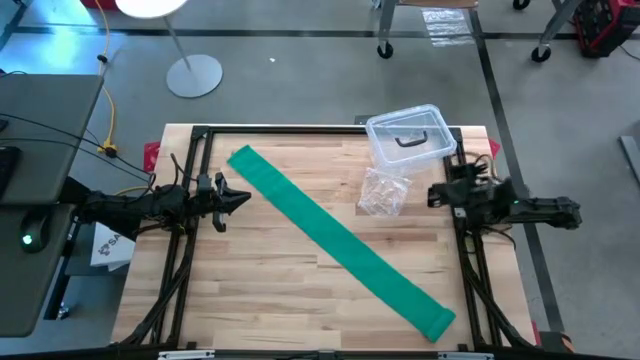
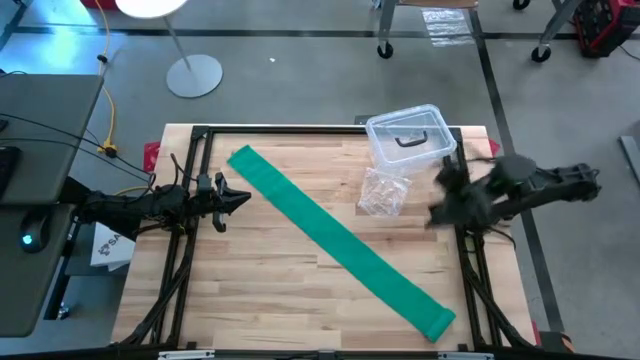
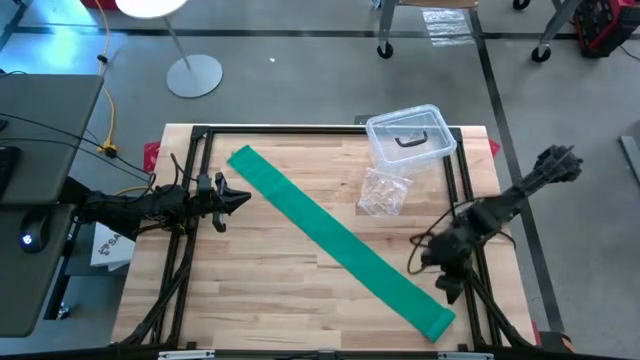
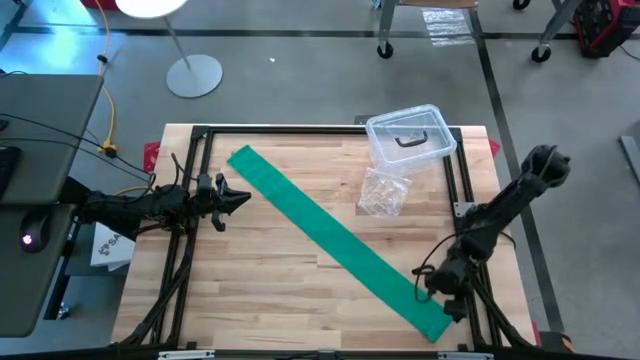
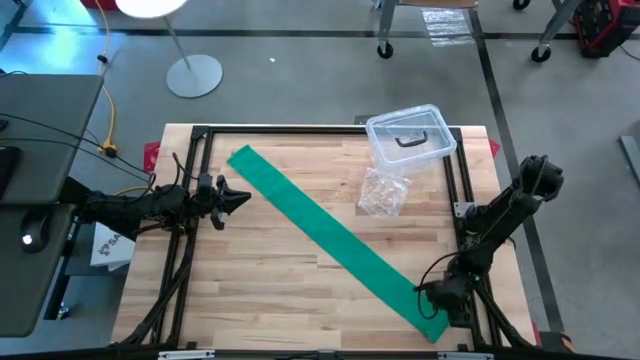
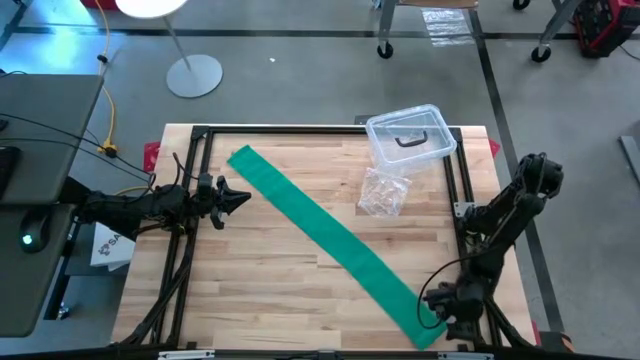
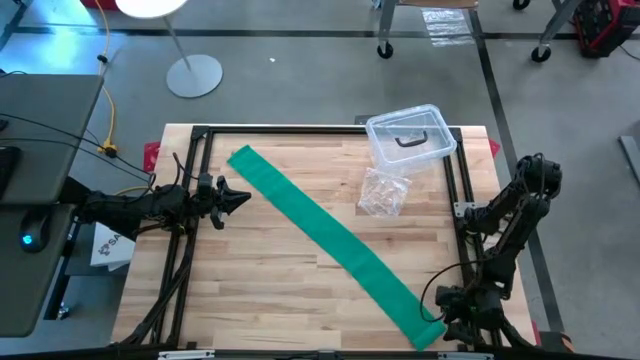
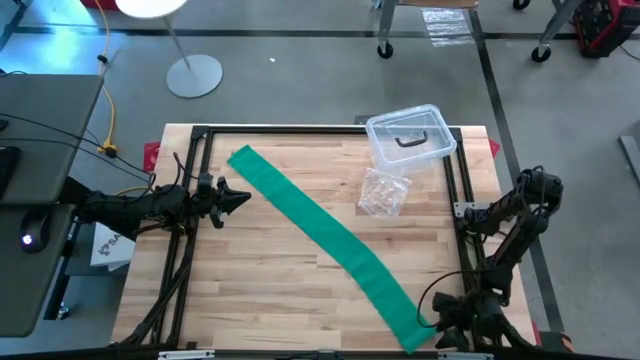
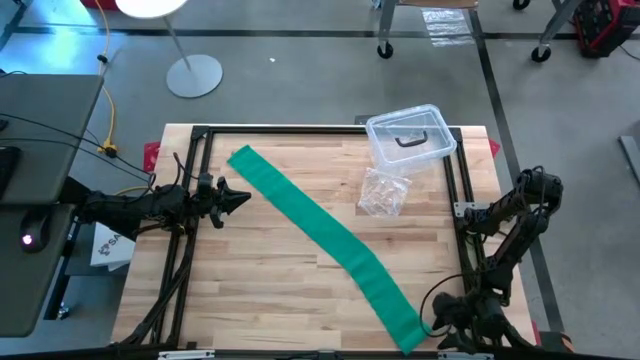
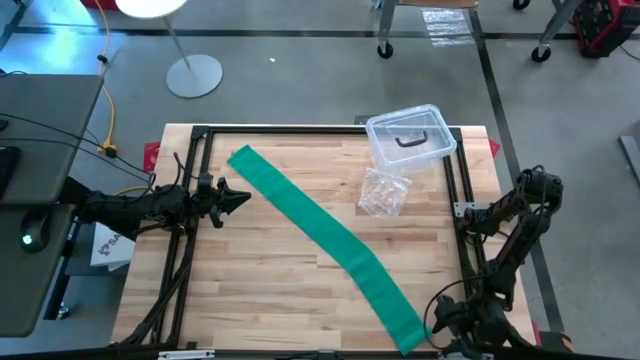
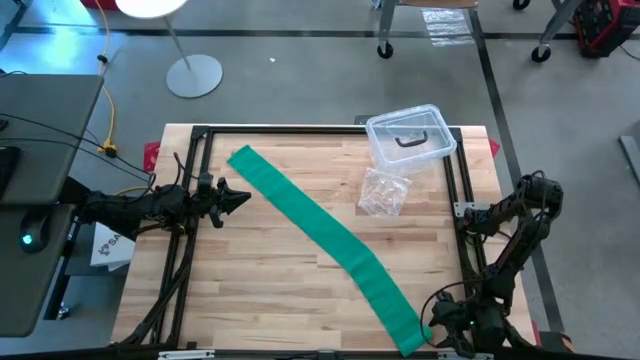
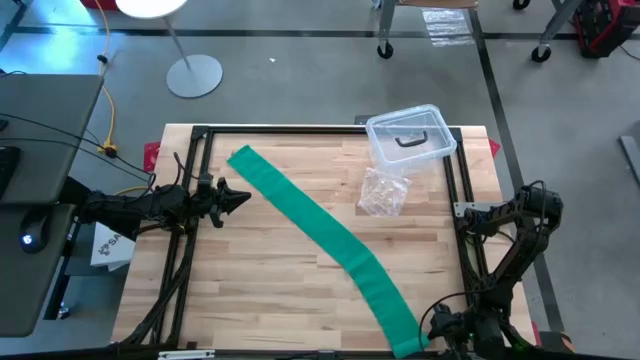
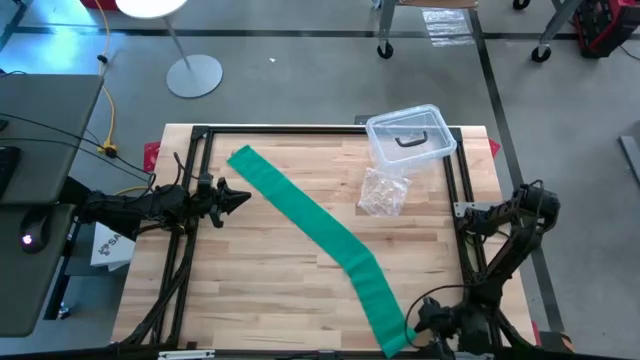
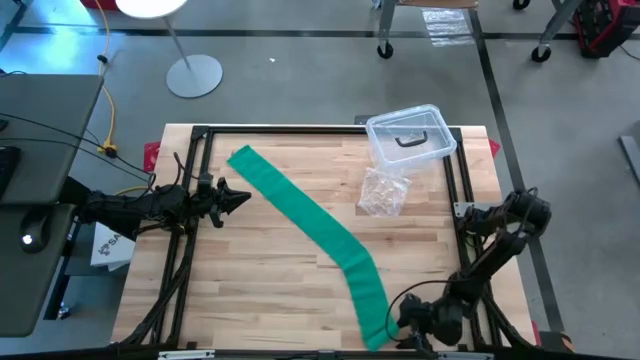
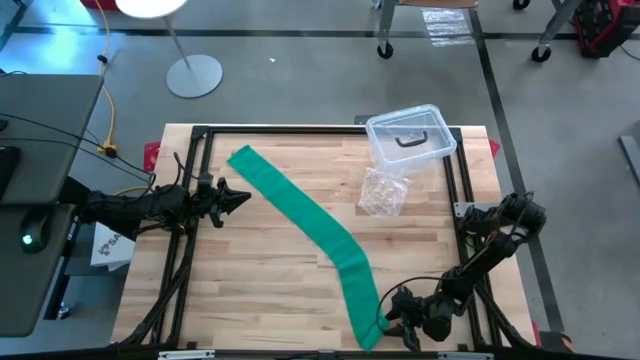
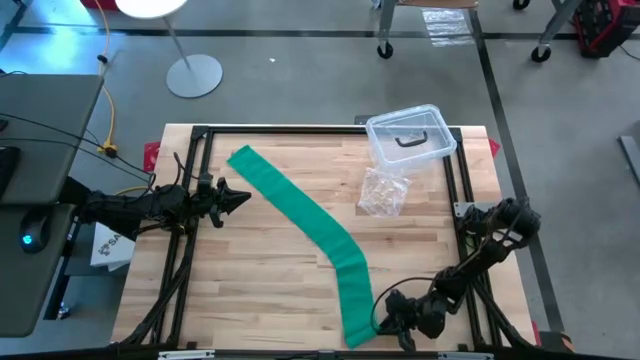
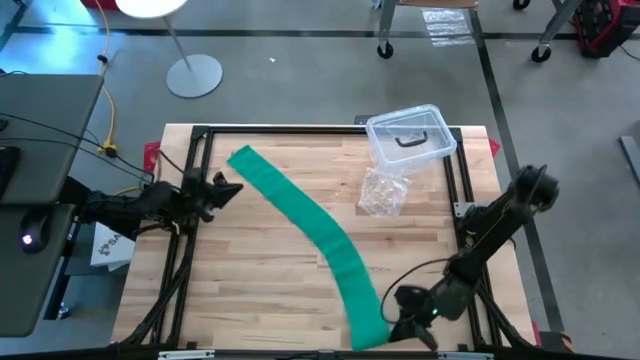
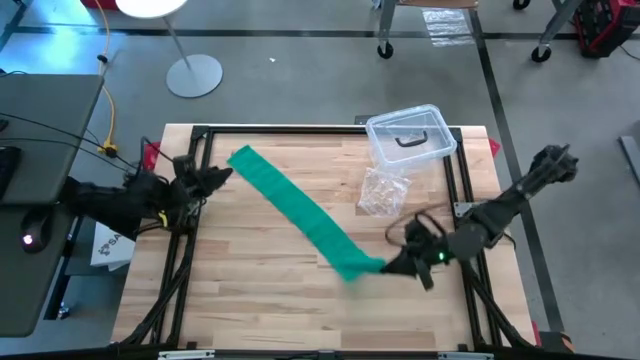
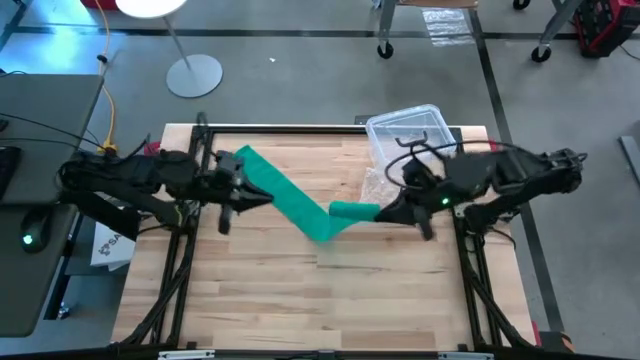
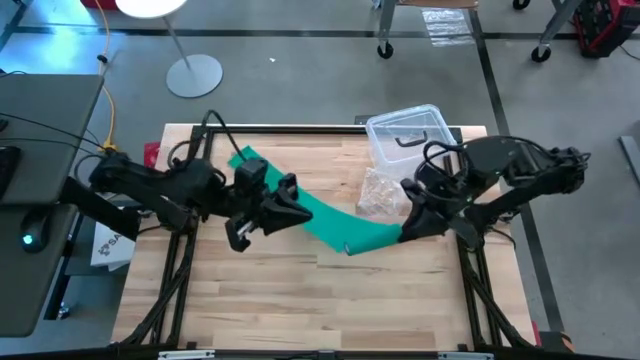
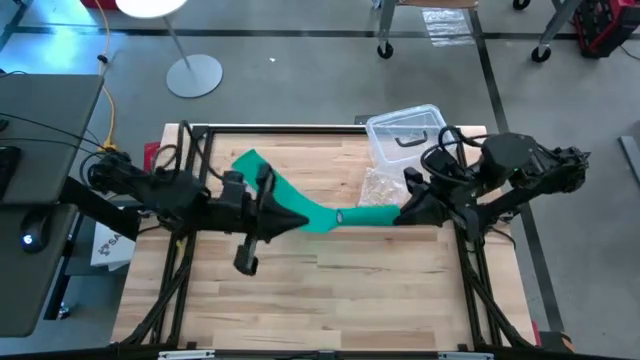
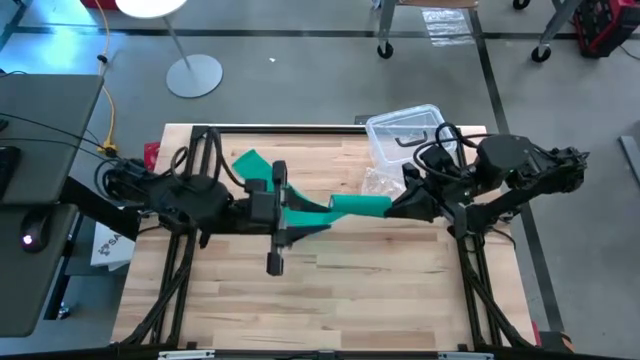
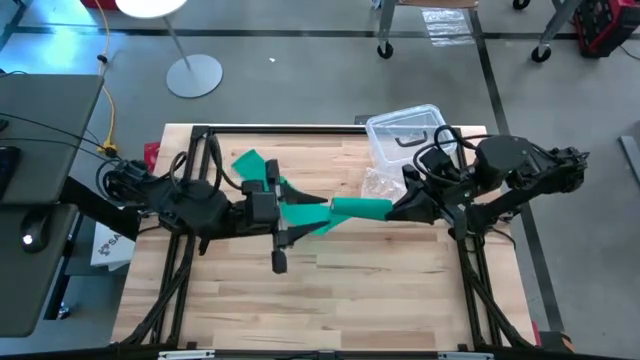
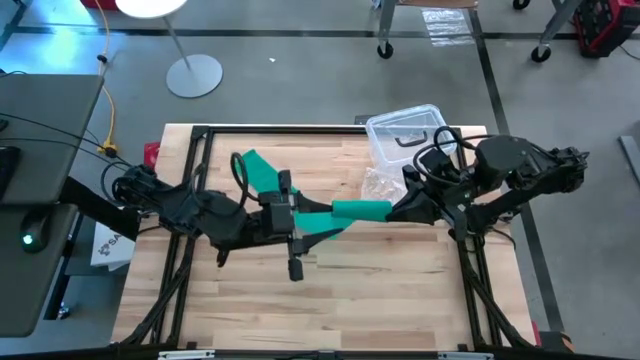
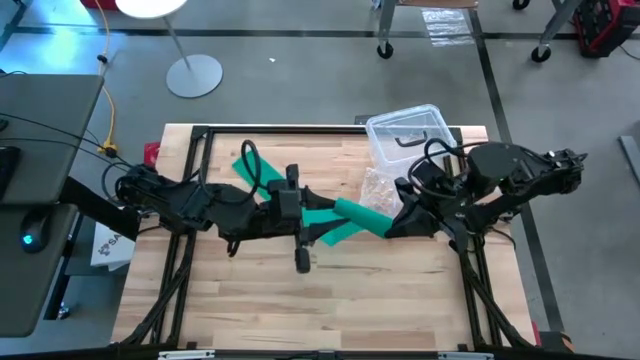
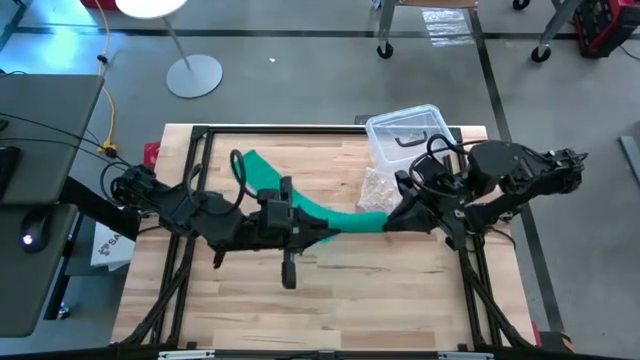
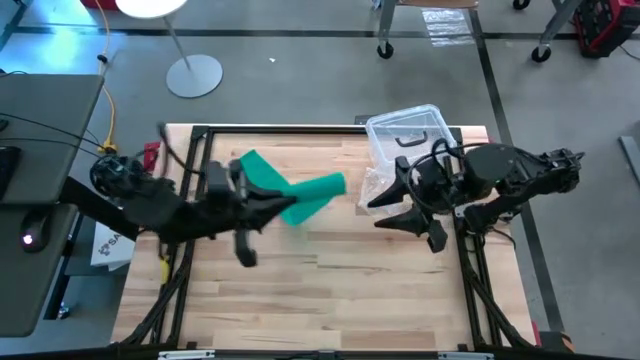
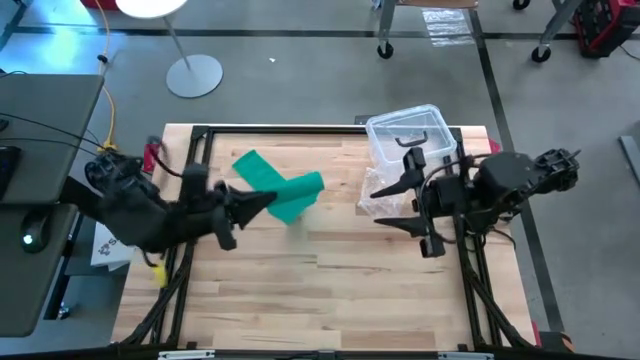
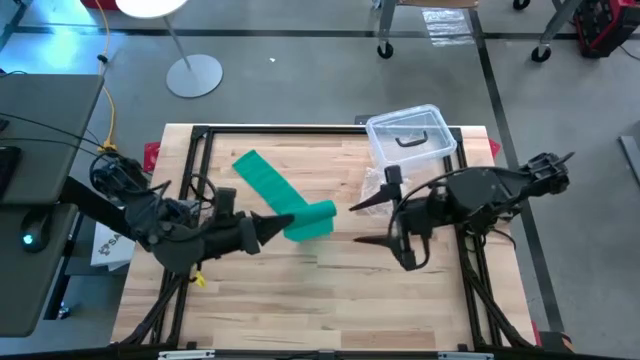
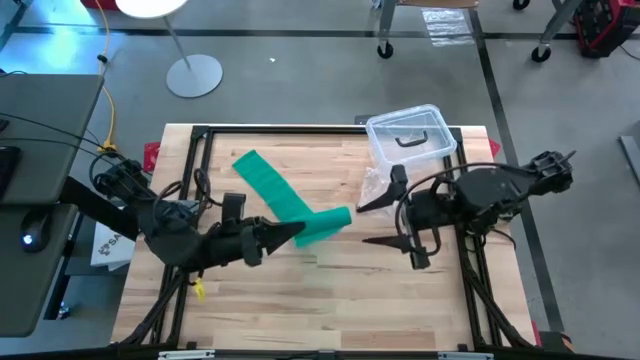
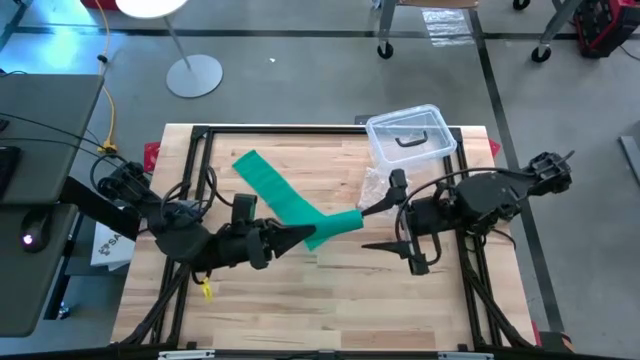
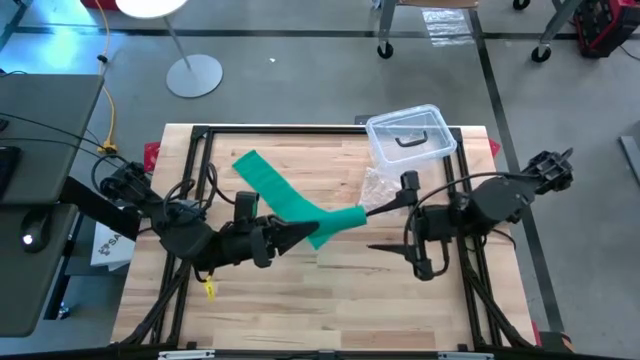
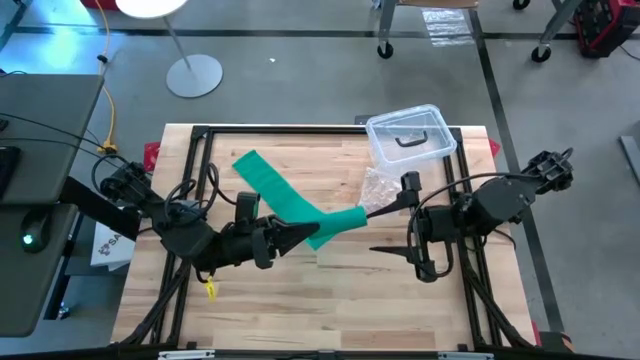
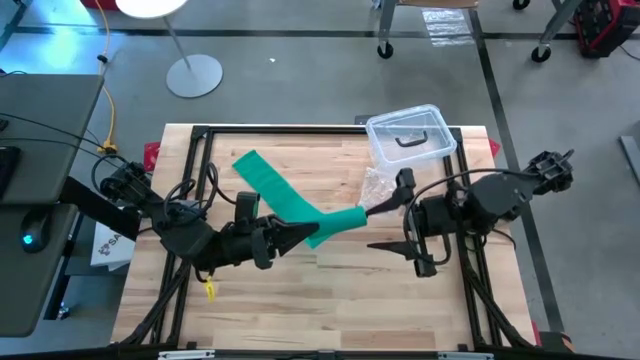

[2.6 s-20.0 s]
Task: Roll bandage
Roll the green bandage

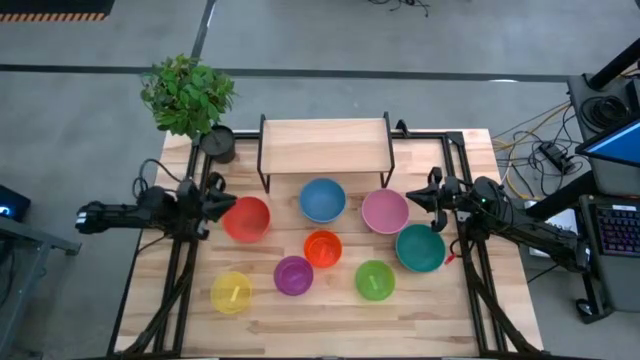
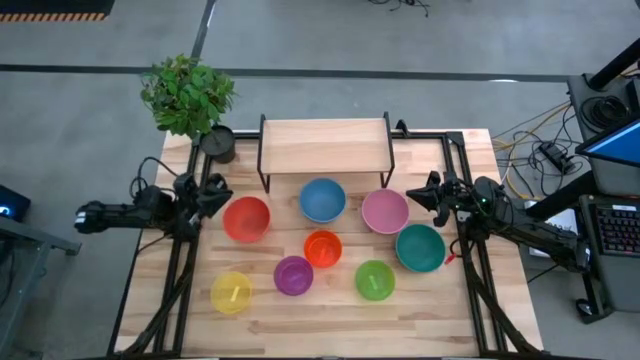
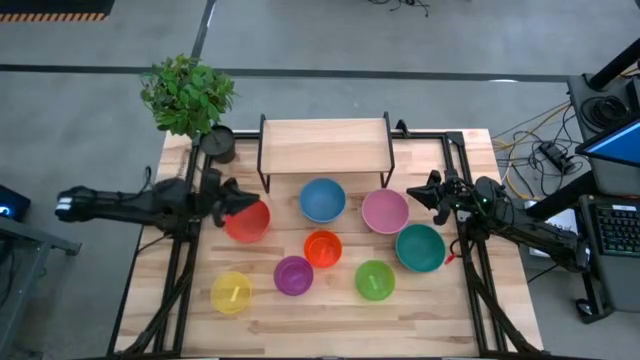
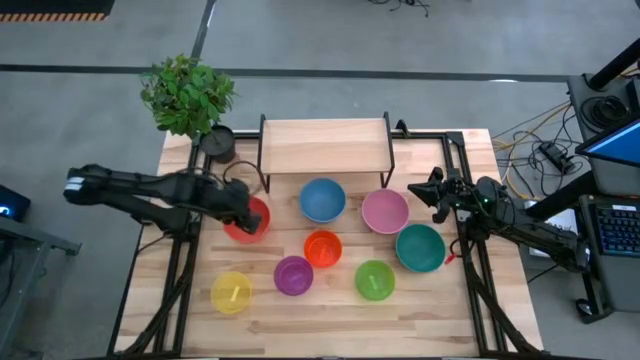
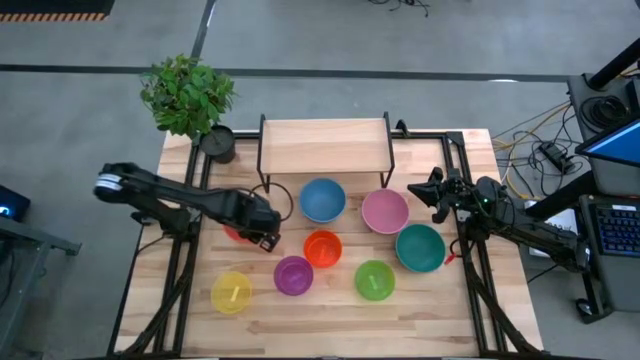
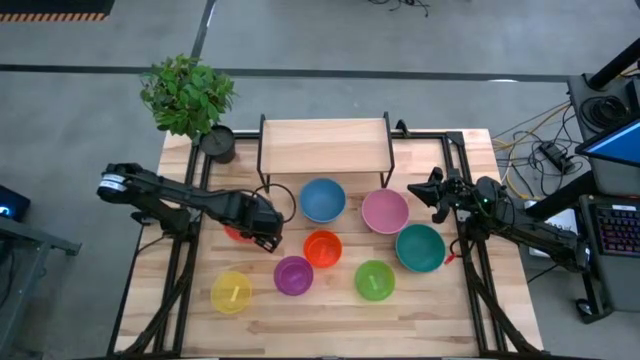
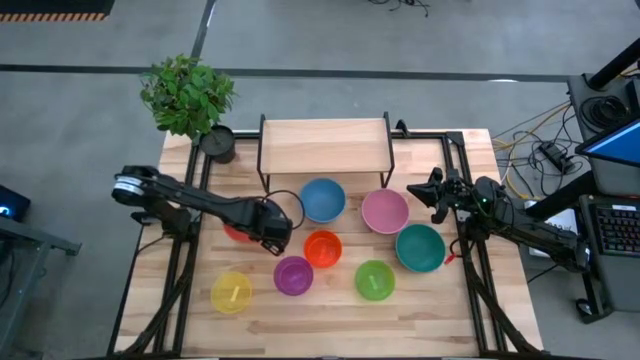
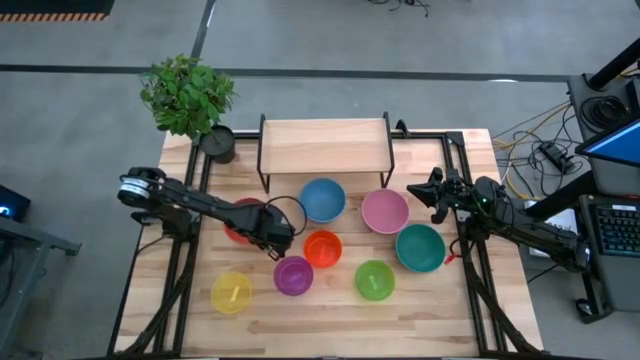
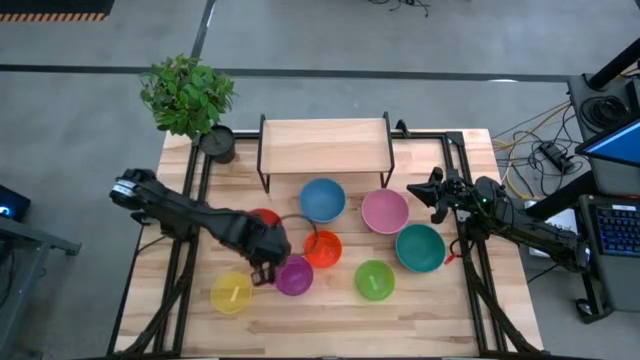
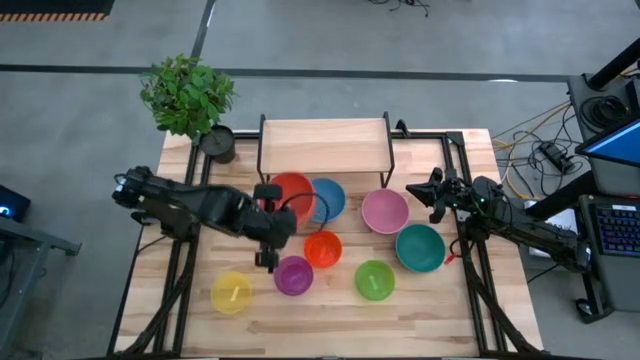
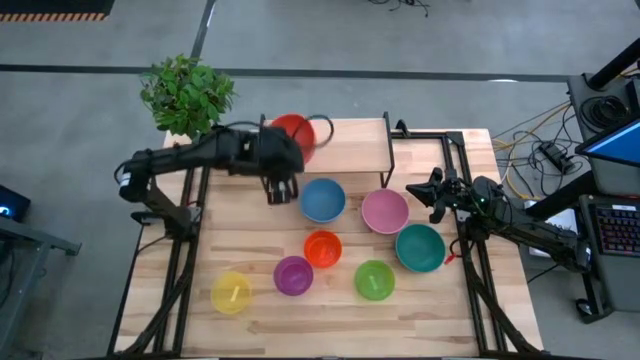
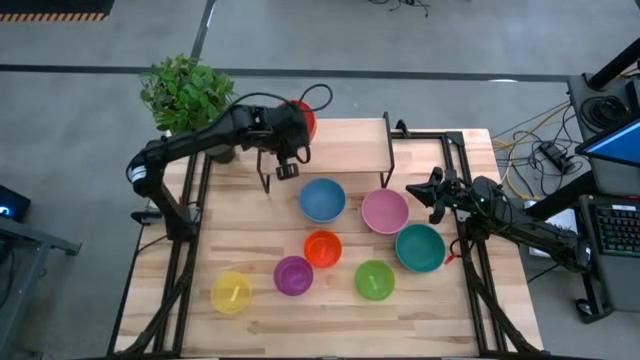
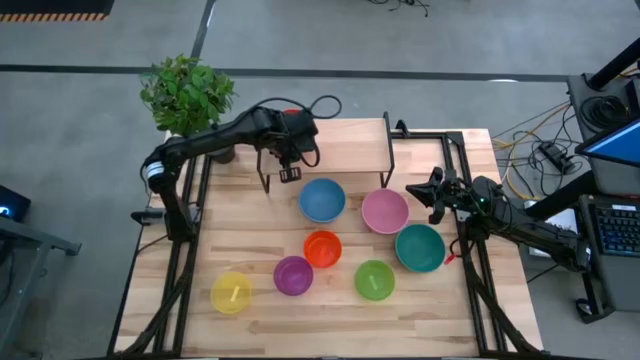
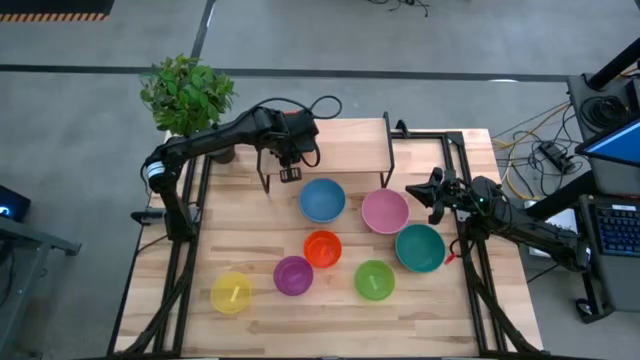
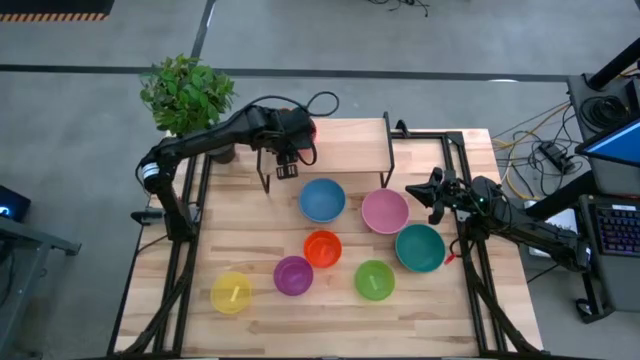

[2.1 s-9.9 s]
Task: Place and stack bowls onto a shelf
Put the large orange bowl on the shelf
